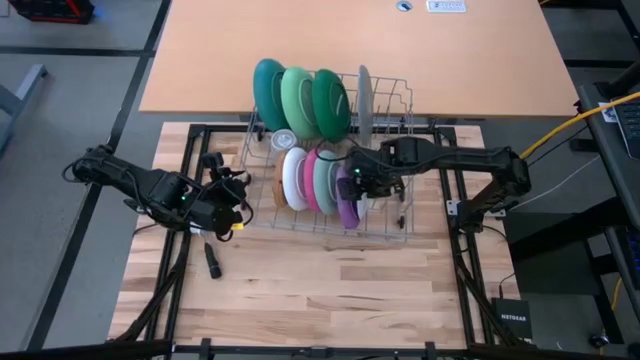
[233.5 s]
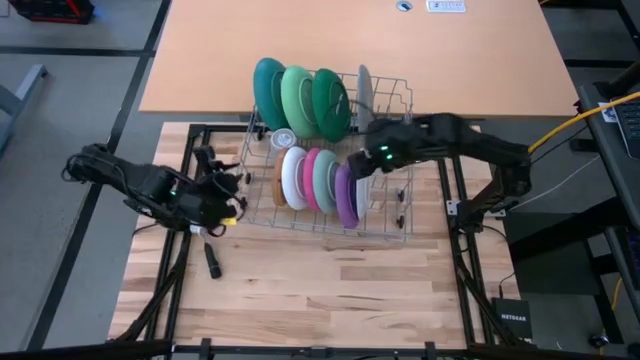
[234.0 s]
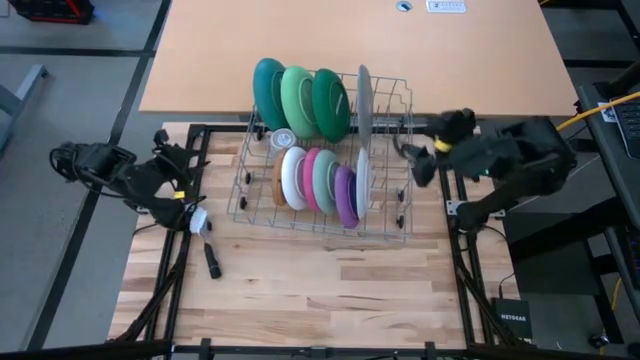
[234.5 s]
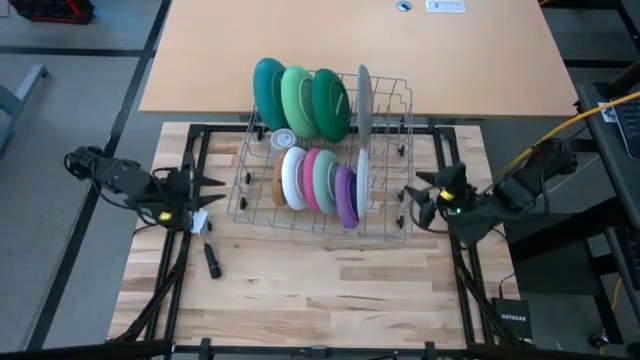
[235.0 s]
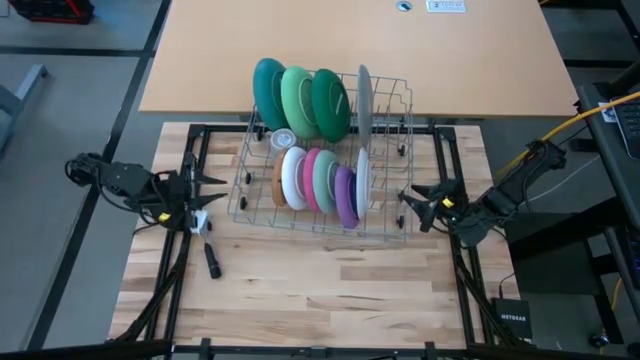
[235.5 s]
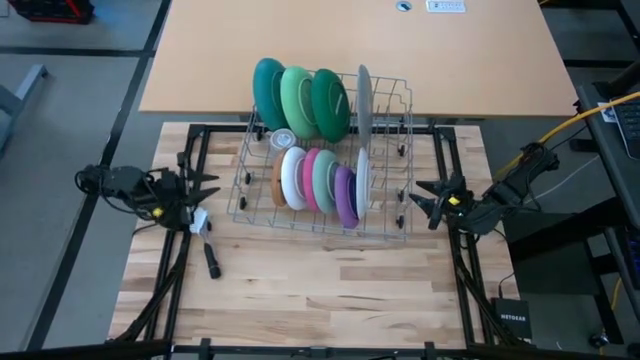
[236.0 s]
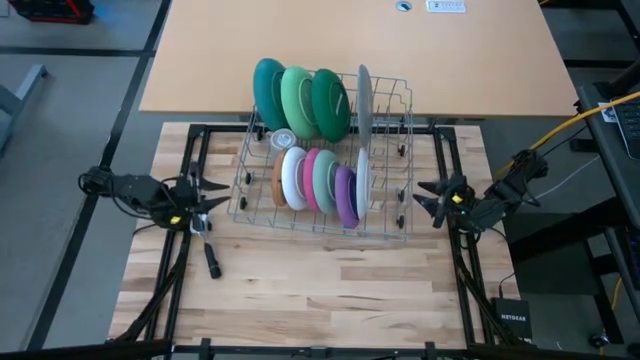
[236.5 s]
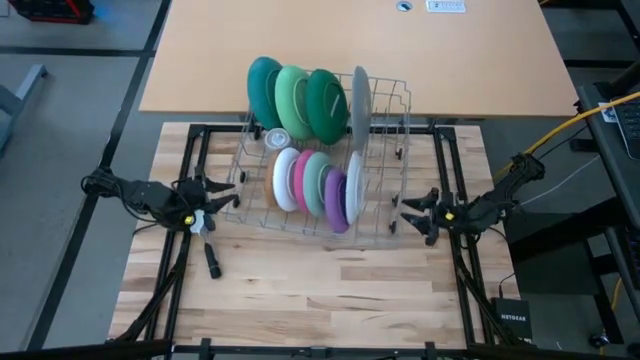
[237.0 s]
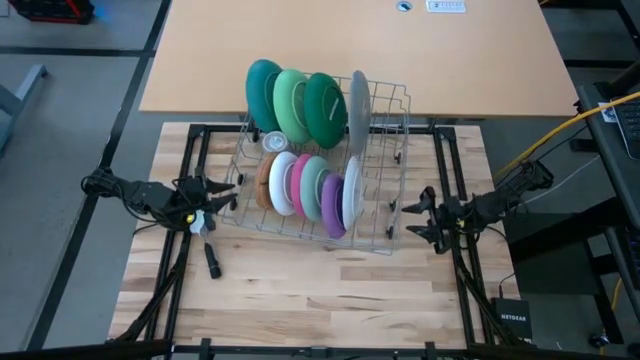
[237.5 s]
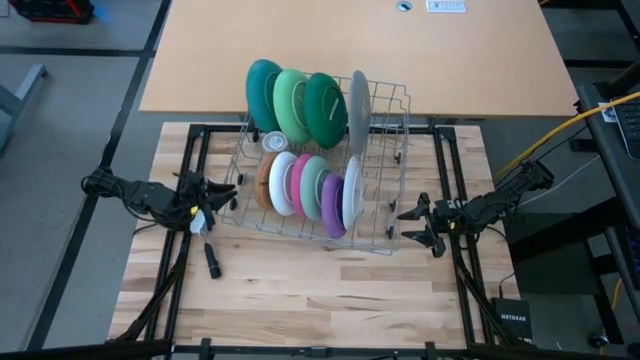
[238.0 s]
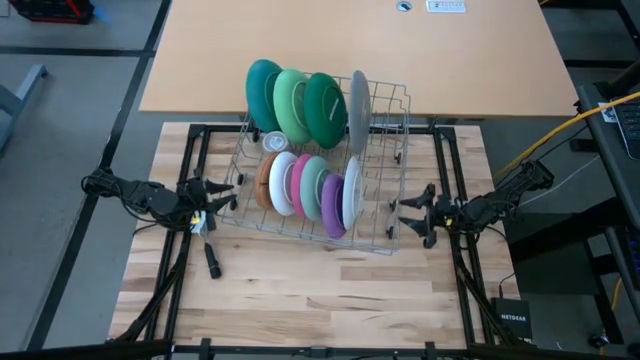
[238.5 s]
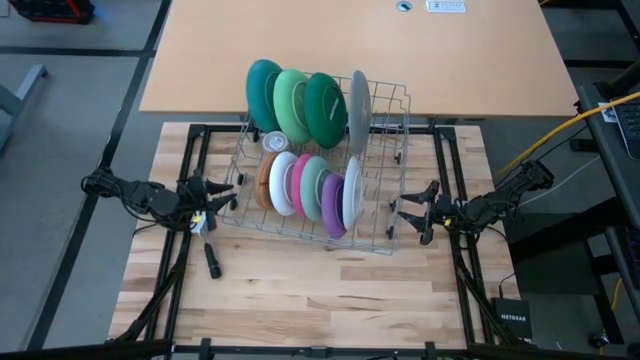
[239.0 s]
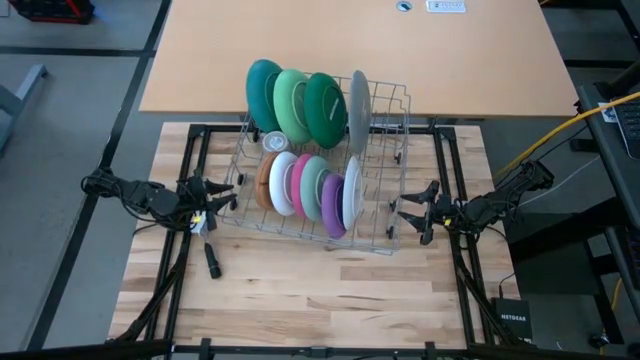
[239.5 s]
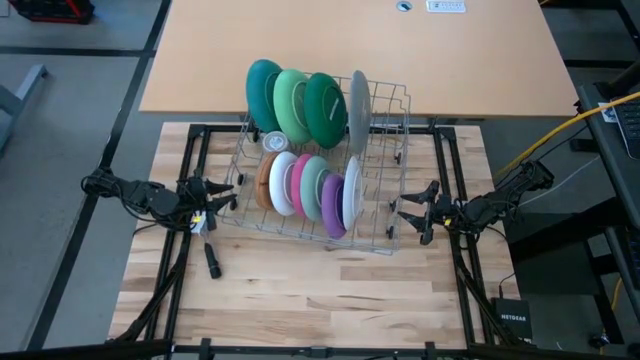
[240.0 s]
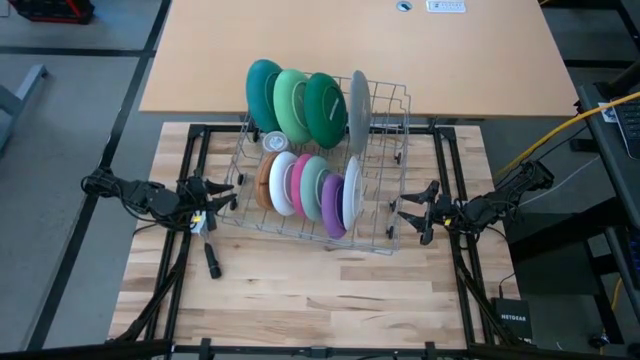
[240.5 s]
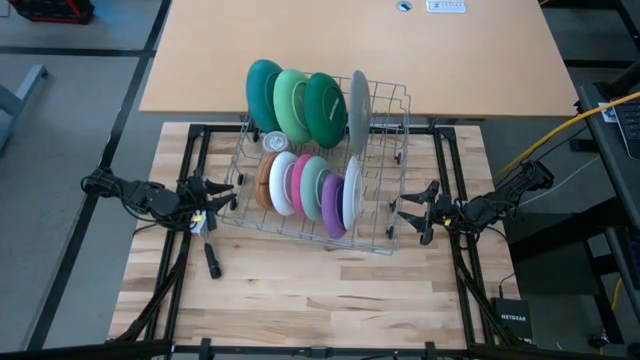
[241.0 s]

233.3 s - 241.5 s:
Task: Sort dishes
Return to Home Position

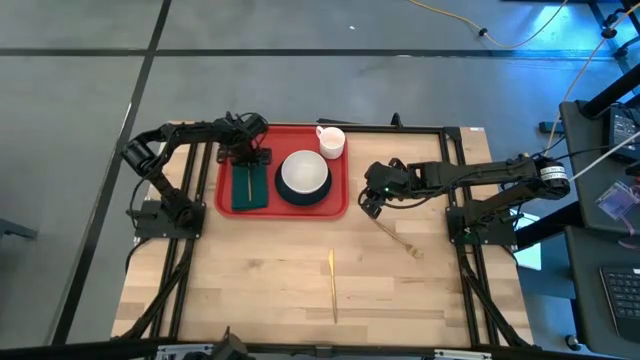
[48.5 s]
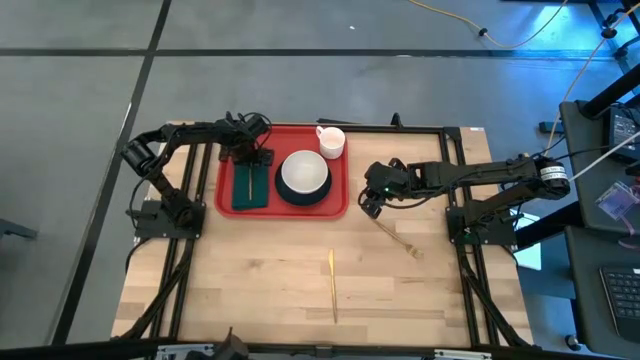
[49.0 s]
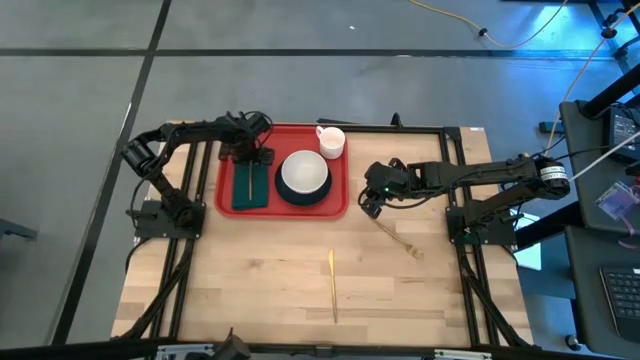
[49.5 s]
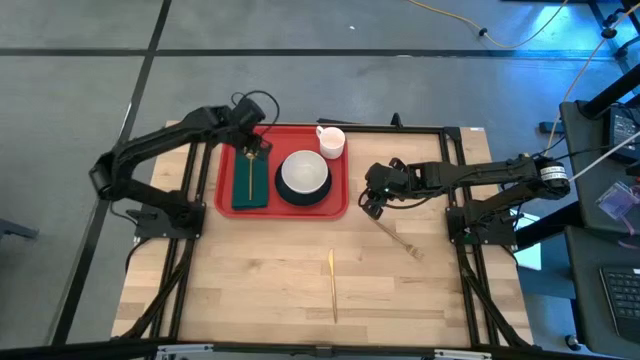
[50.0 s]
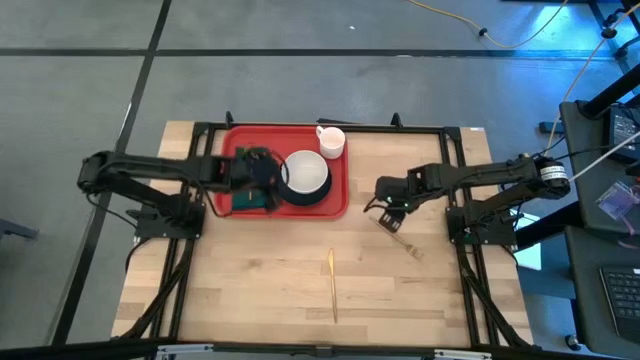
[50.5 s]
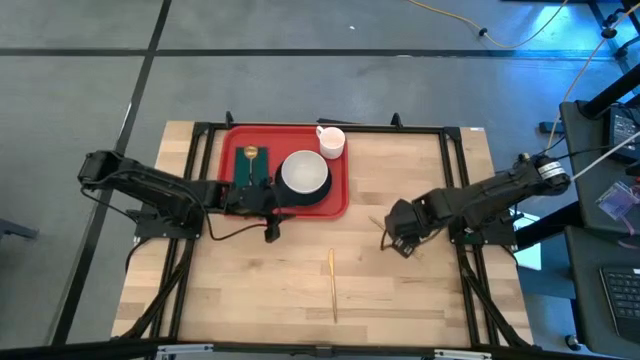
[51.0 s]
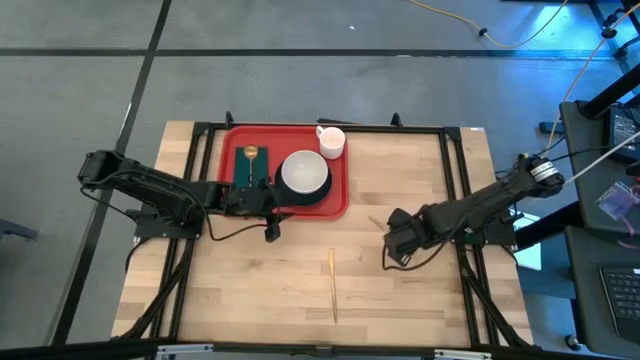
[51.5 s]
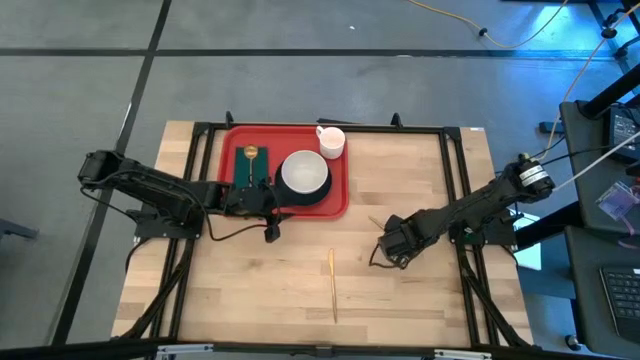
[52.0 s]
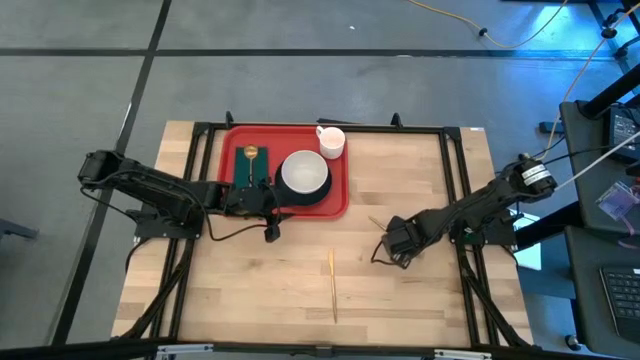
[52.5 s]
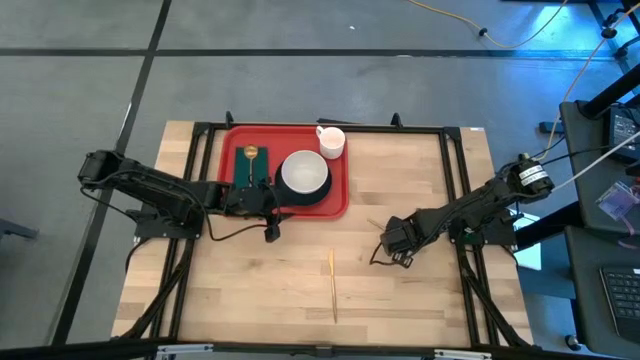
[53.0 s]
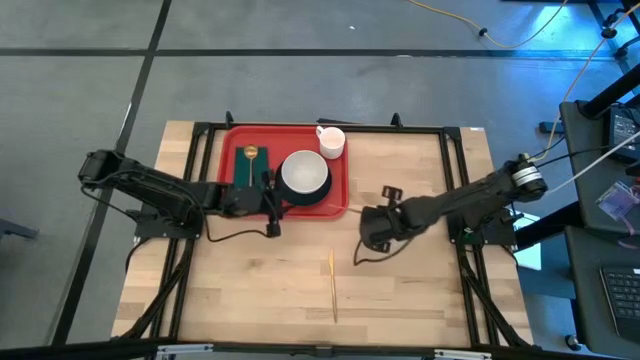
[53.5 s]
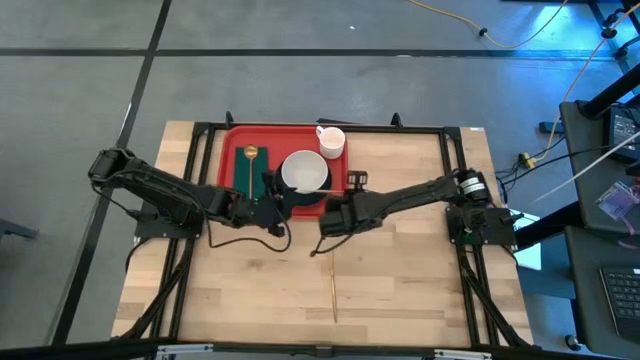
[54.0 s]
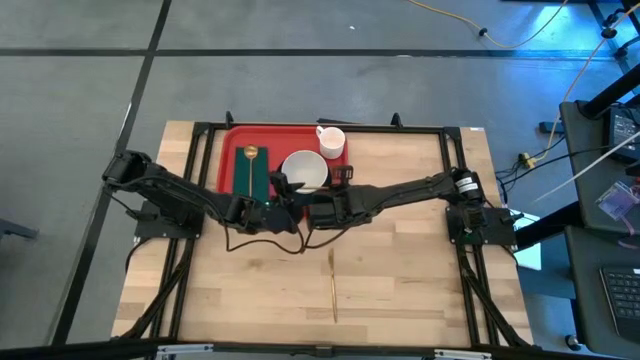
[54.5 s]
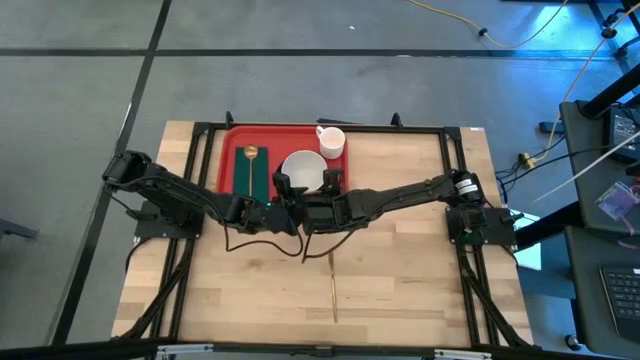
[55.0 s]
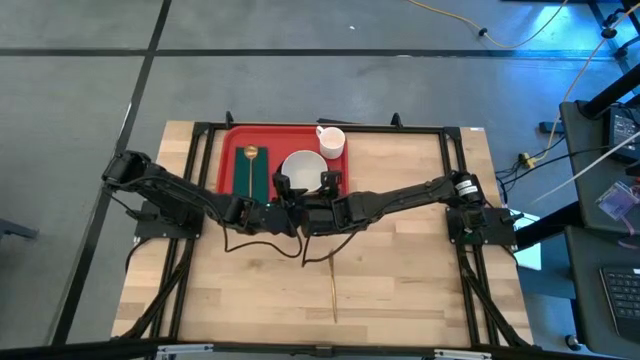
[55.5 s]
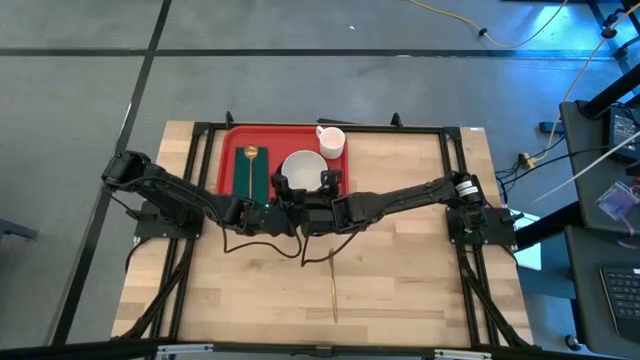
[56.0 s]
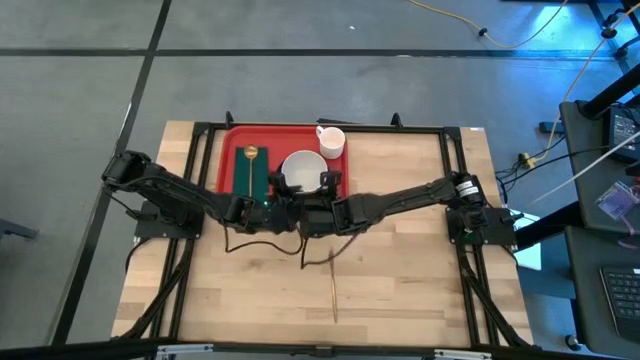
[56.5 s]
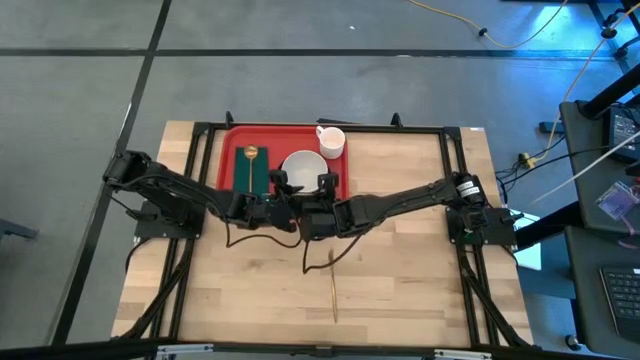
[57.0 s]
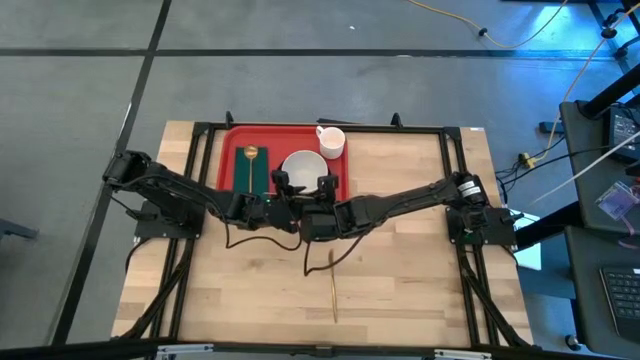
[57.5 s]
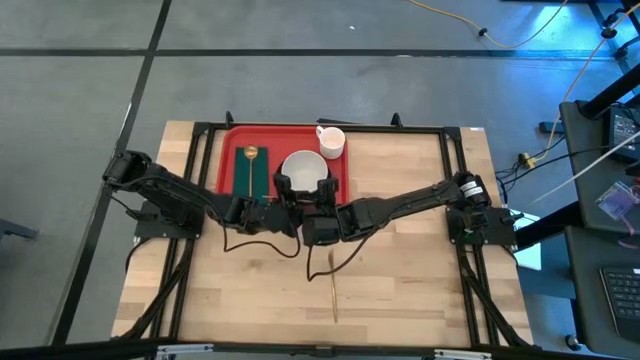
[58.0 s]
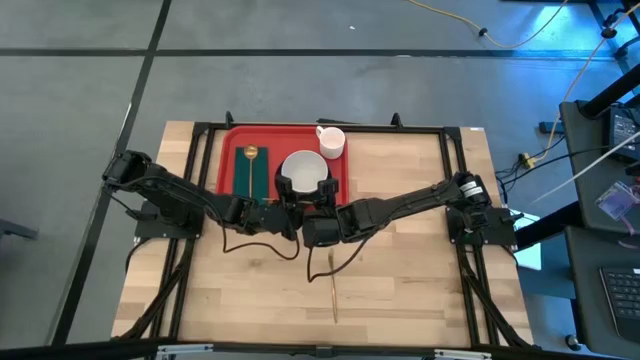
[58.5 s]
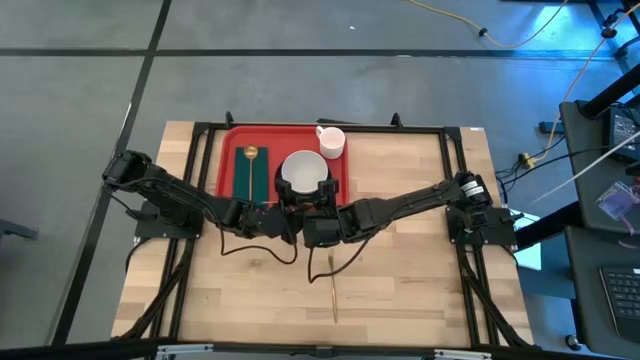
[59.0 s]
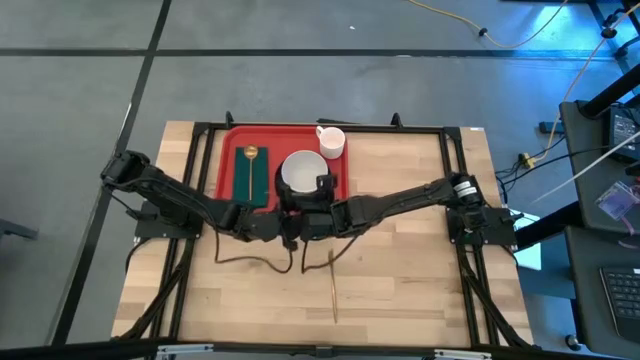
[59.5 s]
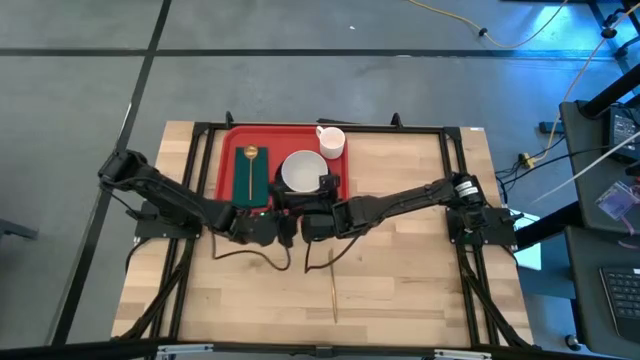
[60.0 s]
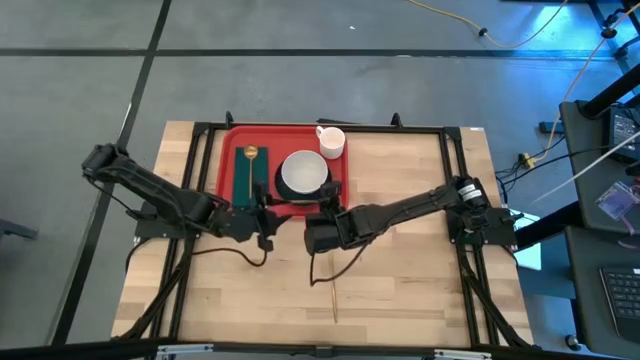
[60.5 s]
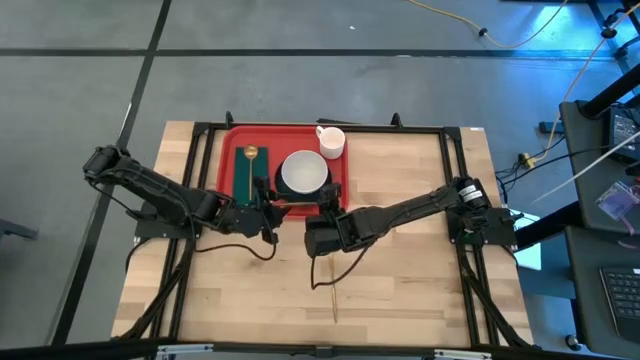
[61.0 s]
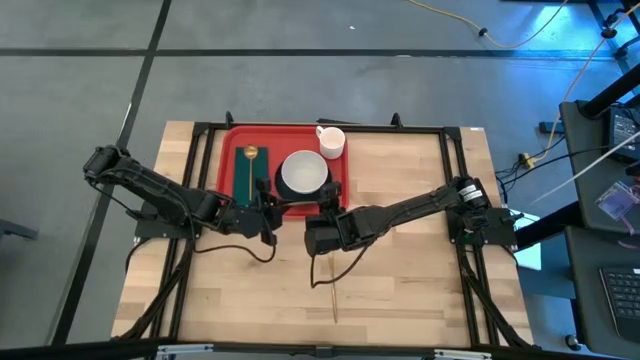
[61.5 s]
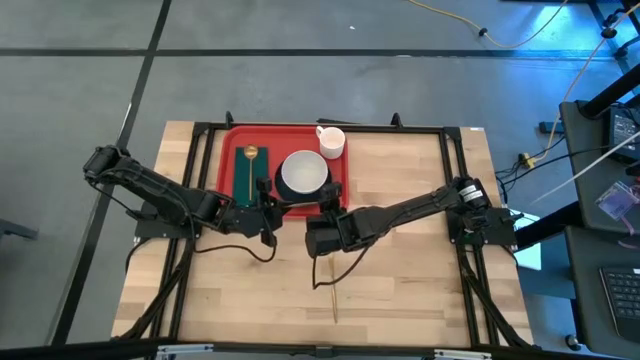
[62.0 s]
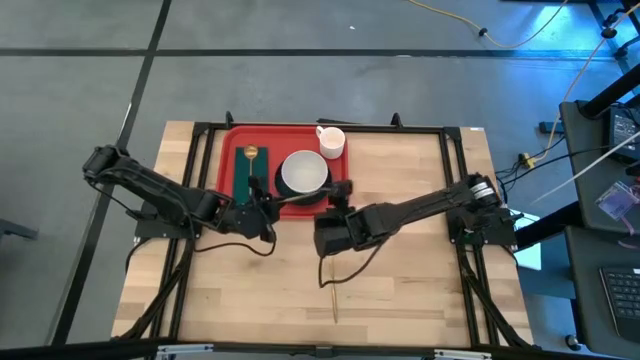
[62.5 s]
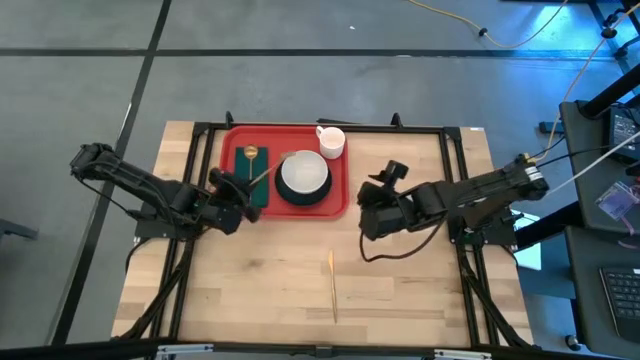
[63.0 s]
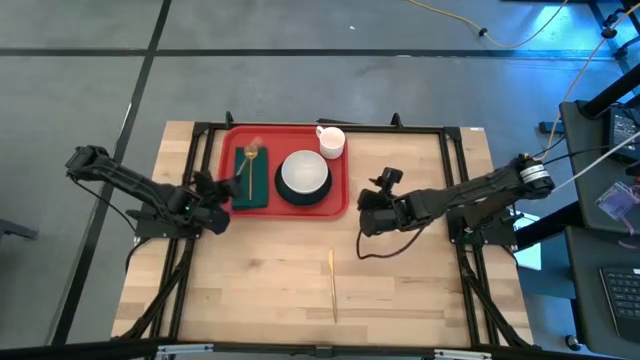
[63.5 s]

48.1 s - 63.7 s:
Task: Set up tray
Put the gold fork on the green napkin to the left of the gold spoon
